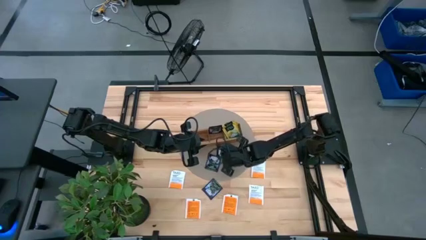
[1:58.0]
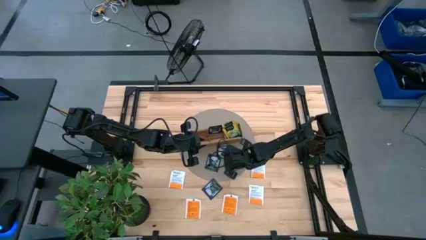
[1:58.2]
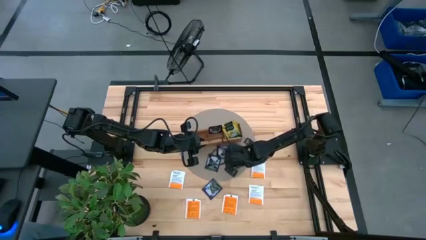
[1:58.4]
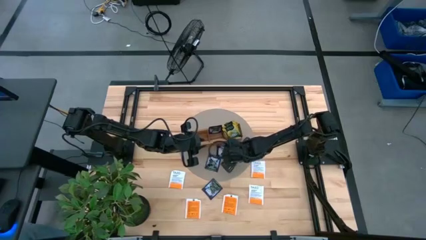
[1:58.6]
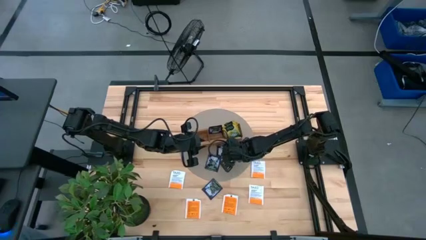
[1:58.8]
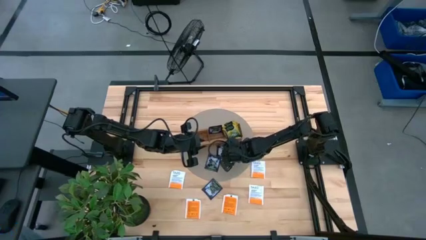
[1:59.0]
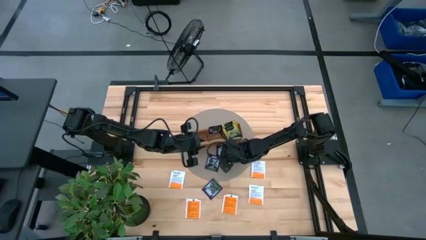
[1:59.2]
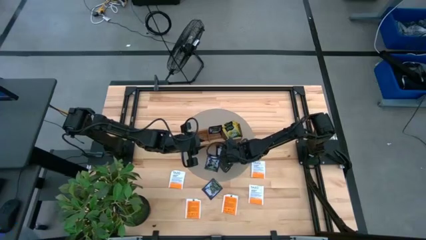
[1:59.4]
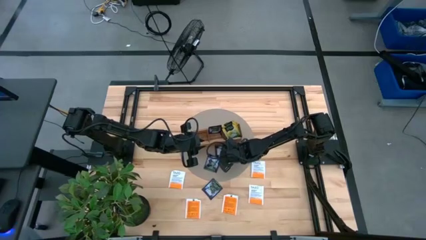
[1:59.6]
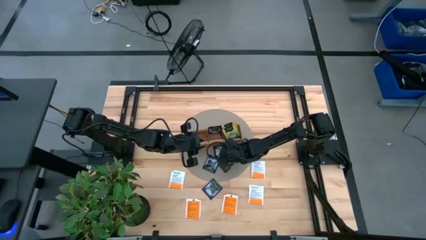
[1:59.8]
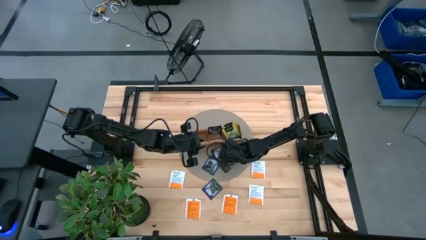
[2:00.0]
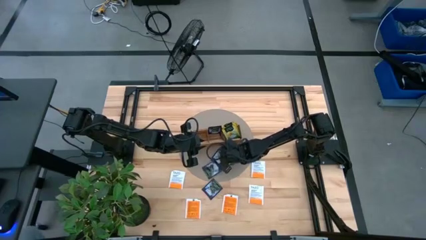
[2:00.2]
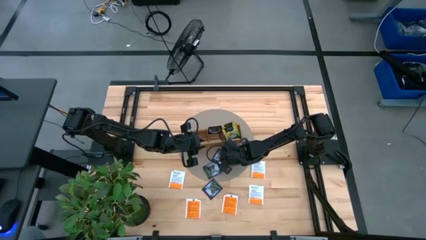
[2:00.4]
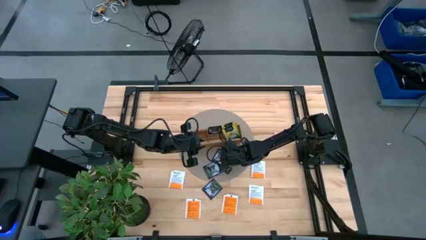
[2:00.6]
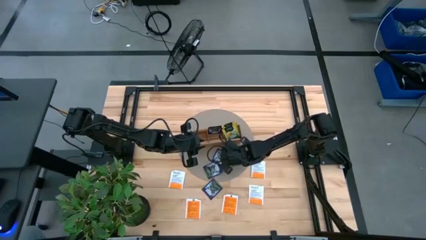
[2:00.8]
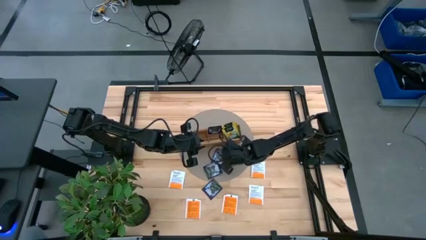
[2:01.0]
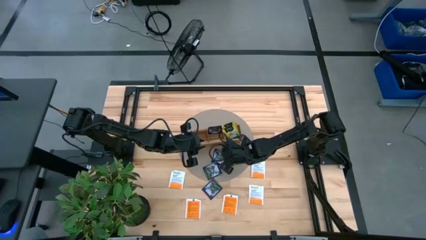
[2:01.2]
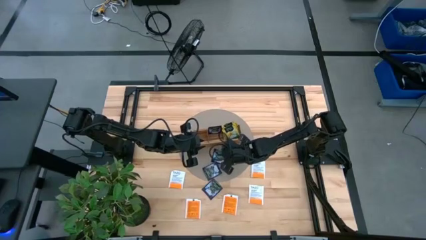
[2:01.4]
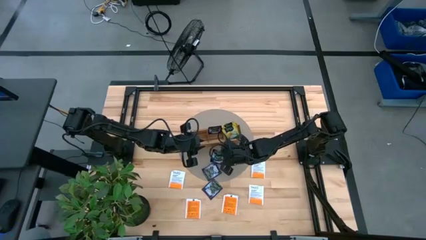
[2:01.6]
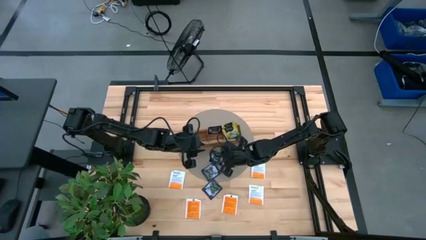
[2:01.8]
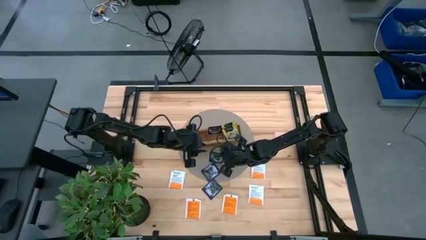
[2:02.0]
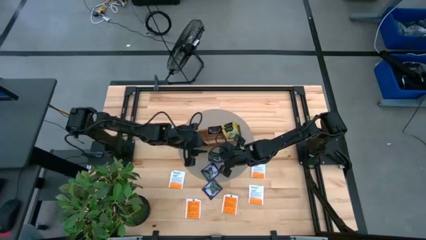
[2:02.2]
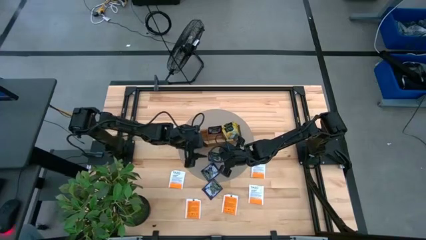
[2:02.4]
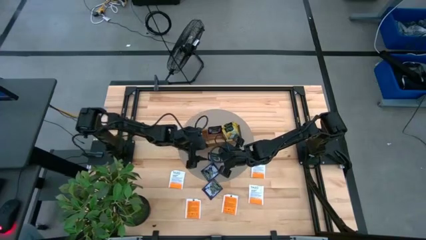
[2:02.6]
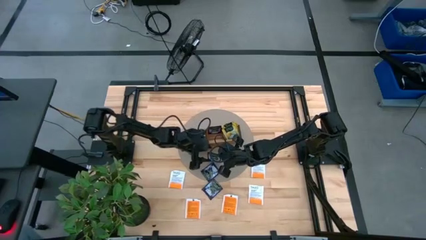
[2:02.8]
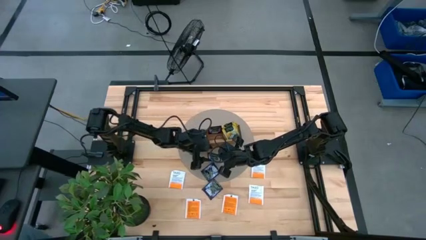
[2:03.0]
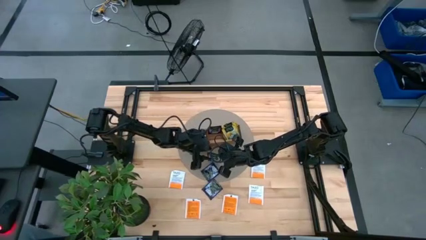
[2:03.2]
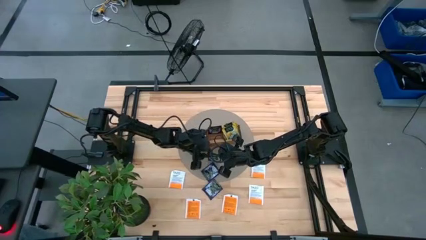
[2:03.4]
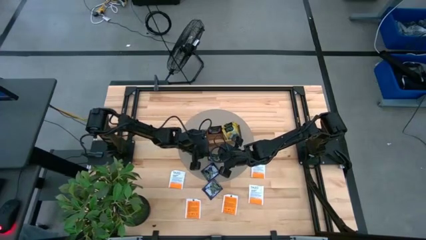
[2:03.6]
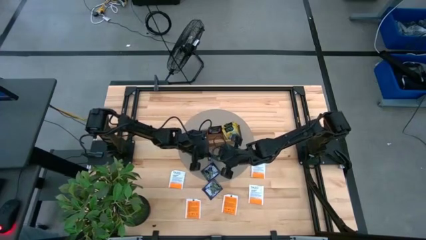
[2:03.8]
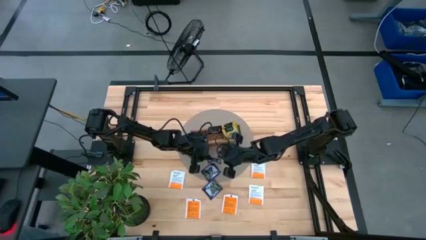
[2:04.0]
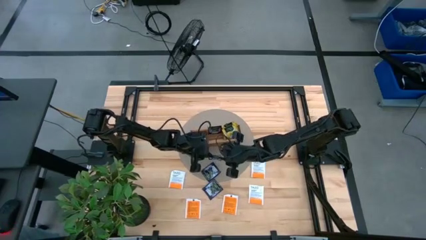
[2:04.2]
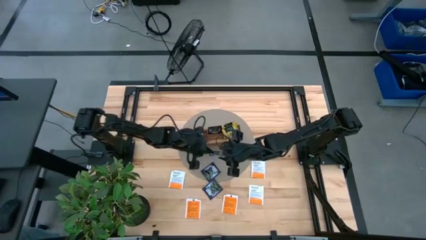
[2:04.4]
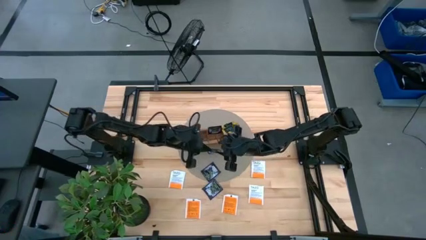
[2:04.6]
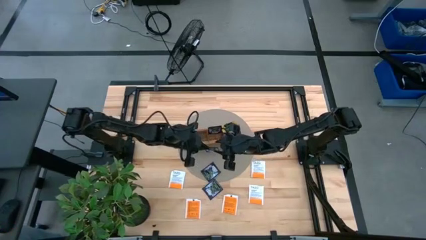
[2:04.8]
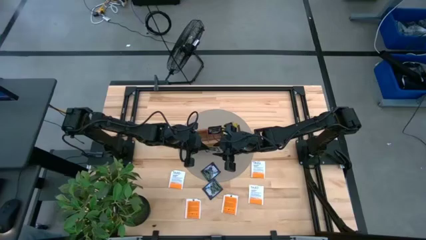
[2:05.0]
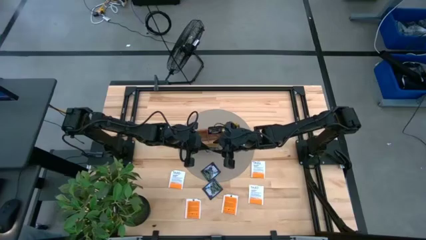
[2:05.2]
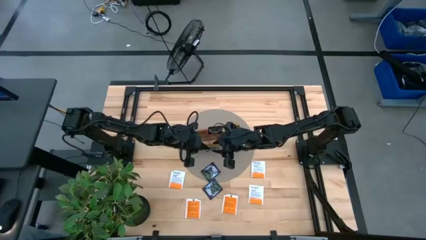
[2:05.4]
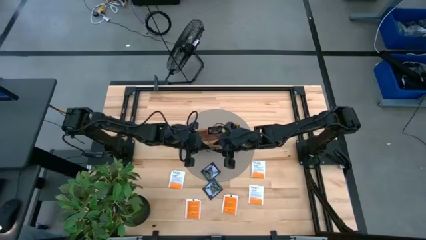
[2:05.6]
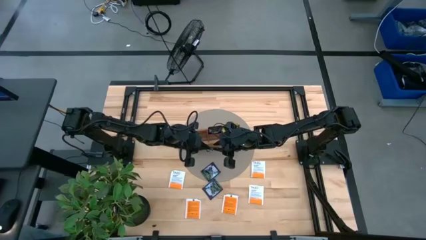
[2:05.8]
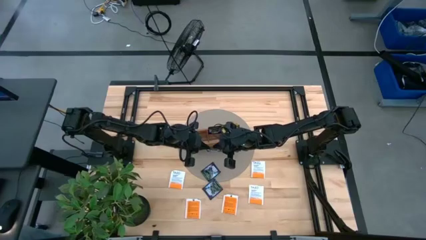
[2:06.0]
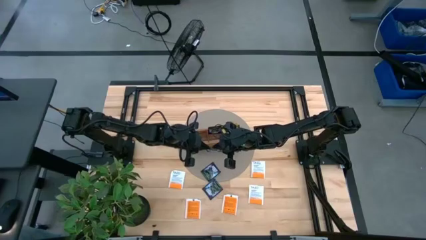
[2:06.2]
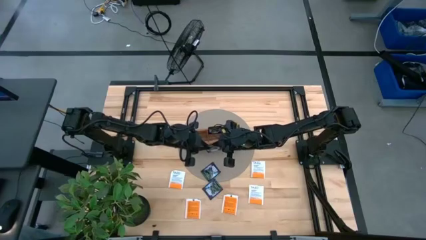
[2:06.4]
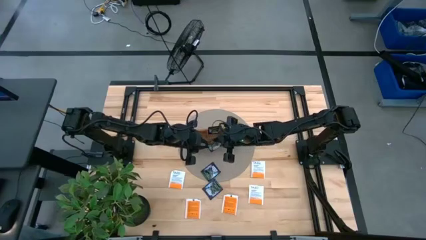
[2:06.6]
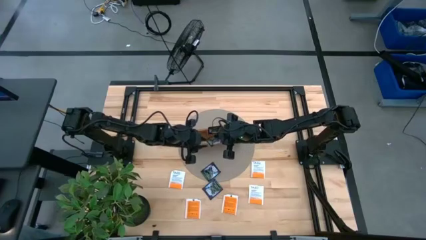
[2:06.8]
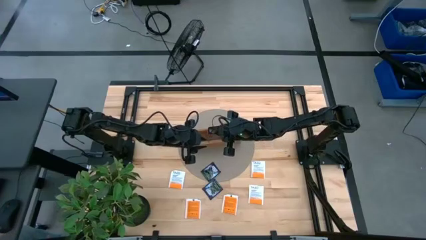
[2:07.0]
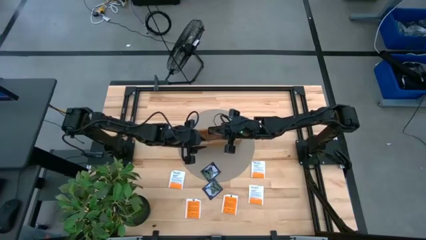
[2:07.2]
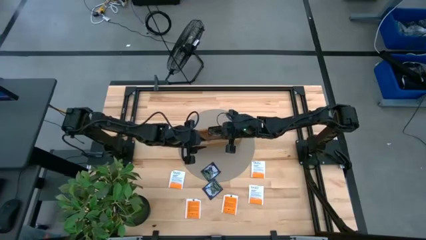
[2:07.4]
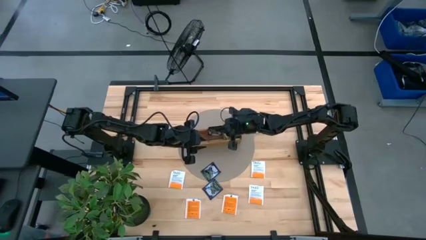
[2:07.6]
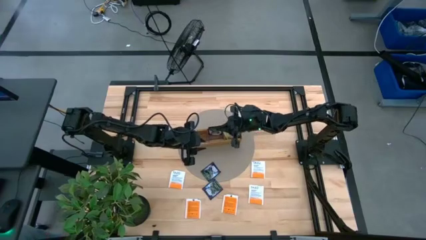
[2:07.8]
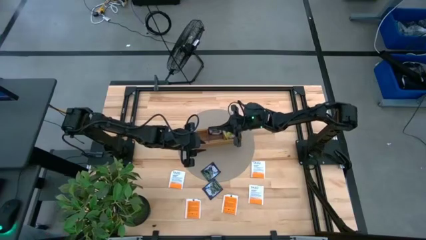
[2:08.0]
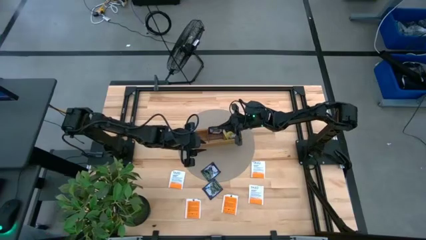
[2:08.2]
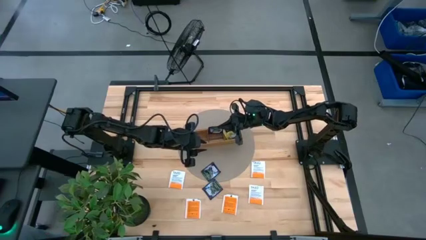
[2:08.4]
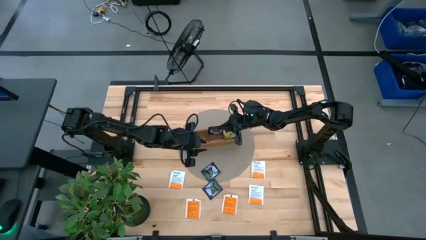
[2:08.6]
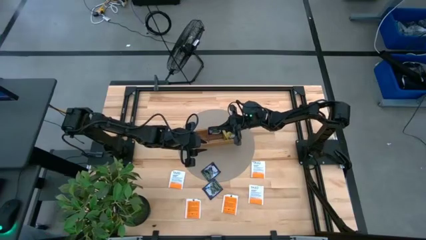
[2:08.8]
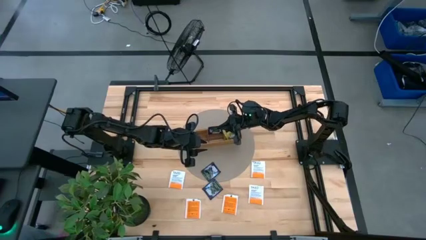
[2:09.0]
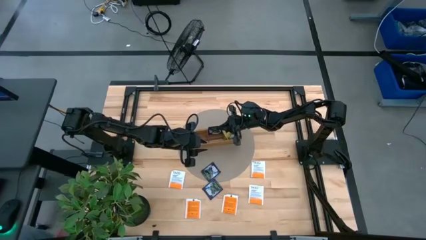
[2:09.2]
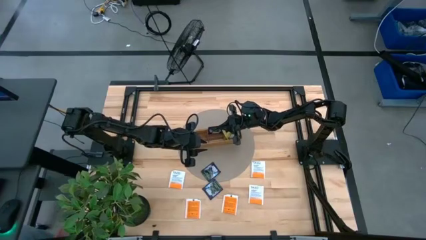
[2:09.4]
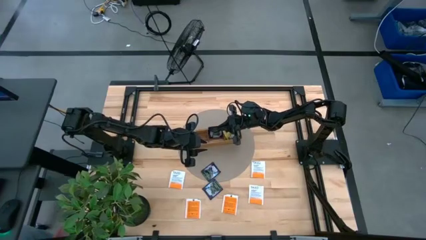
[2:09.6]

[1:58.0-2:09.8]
Task: Pick & Place Tea
Put the violet tea bag into the middle section of the wooden organizer

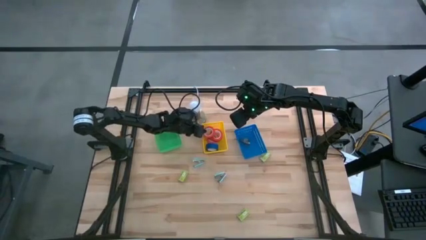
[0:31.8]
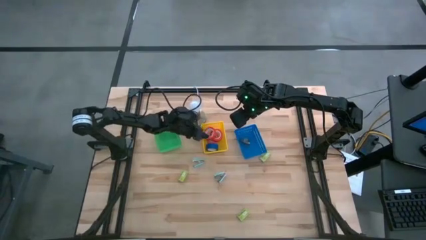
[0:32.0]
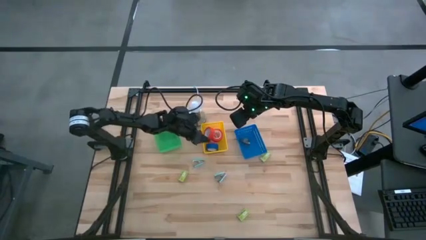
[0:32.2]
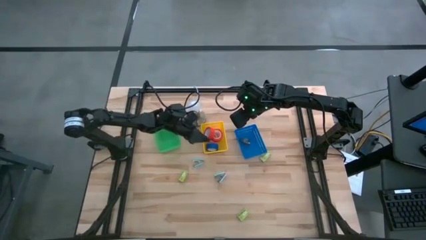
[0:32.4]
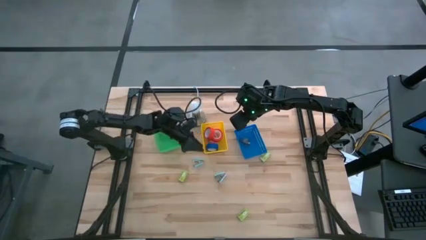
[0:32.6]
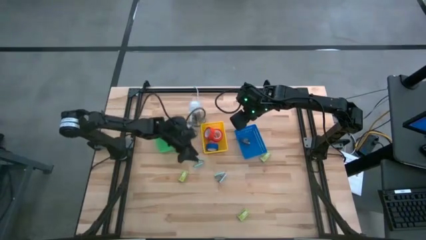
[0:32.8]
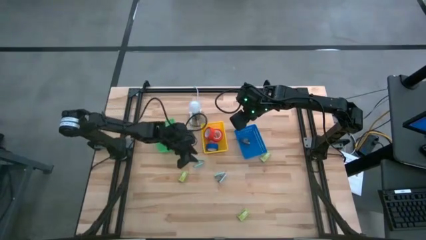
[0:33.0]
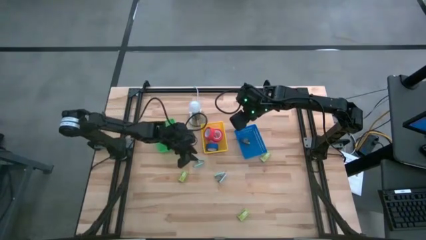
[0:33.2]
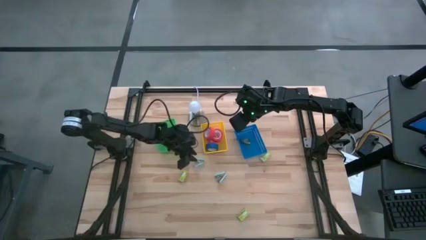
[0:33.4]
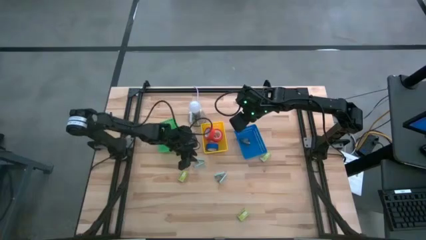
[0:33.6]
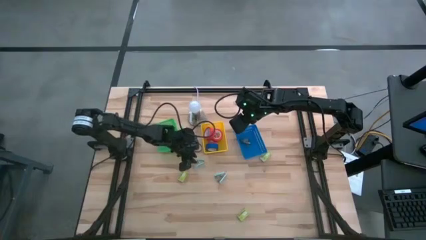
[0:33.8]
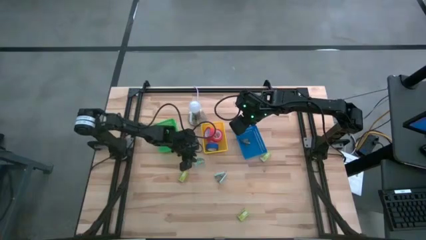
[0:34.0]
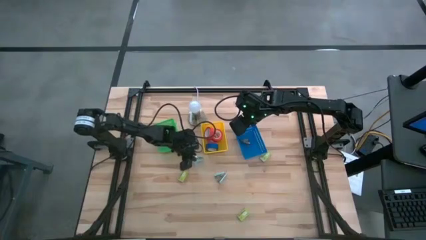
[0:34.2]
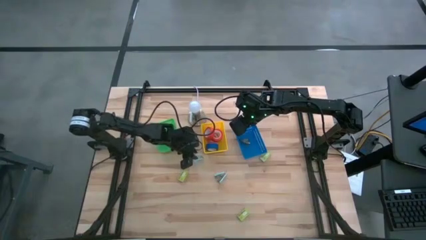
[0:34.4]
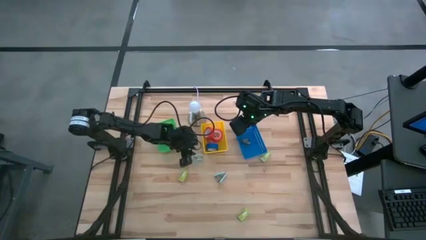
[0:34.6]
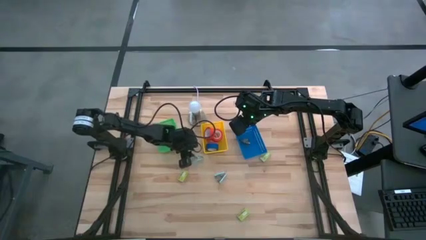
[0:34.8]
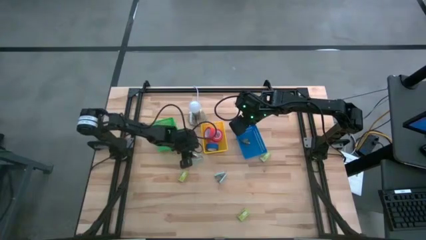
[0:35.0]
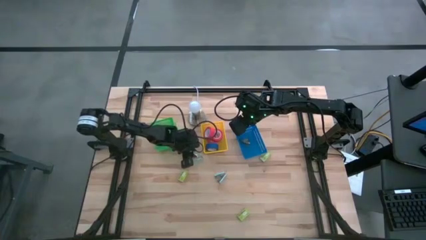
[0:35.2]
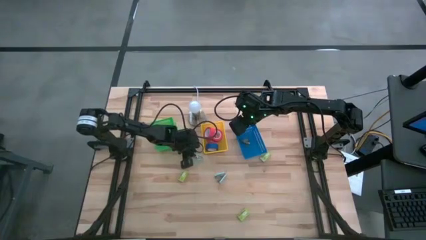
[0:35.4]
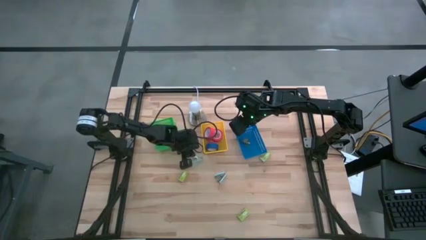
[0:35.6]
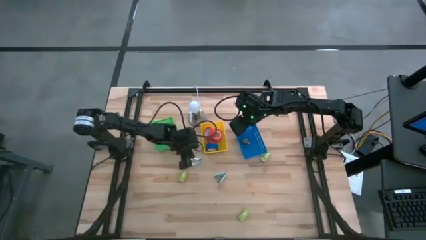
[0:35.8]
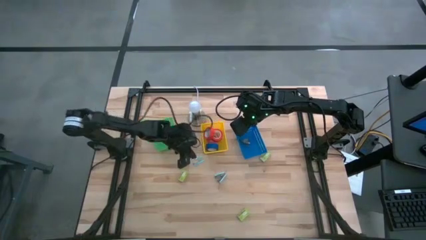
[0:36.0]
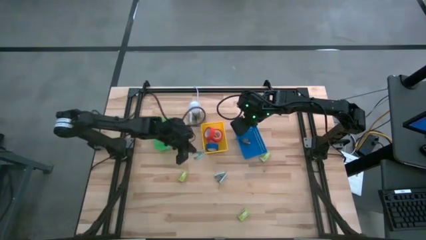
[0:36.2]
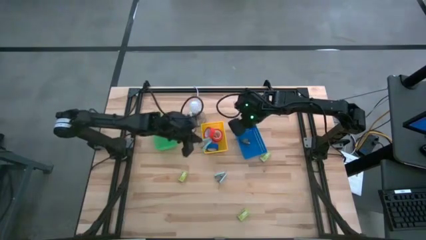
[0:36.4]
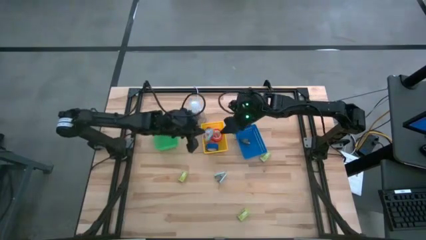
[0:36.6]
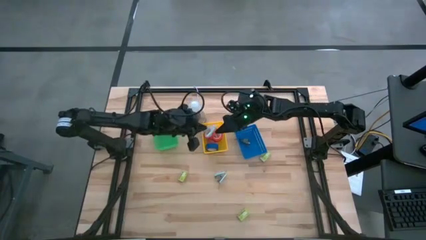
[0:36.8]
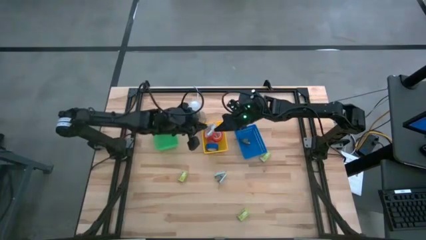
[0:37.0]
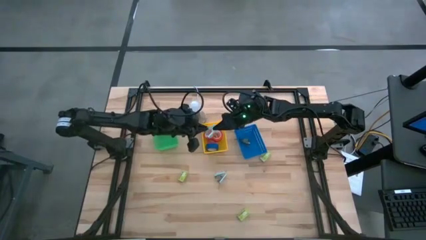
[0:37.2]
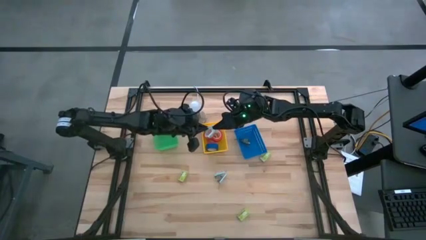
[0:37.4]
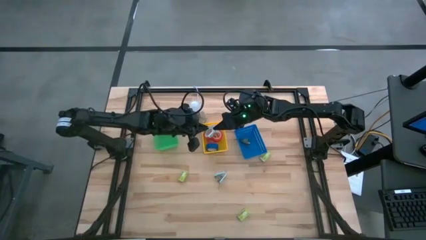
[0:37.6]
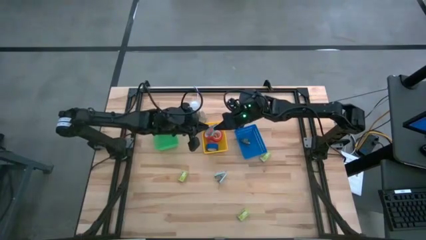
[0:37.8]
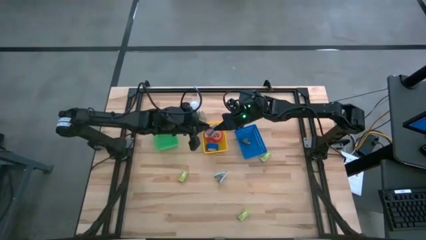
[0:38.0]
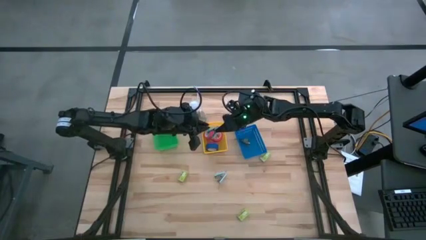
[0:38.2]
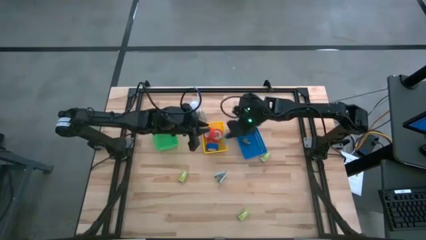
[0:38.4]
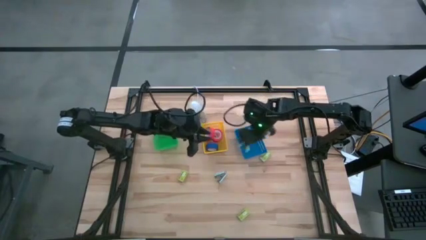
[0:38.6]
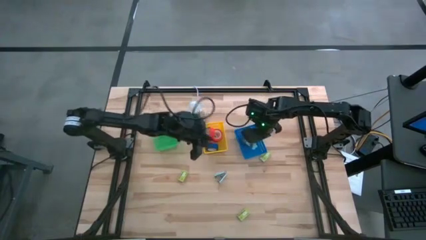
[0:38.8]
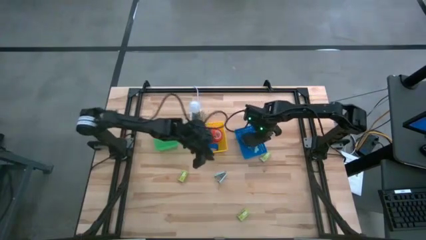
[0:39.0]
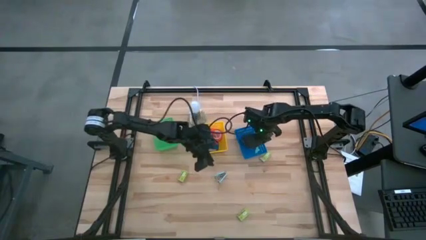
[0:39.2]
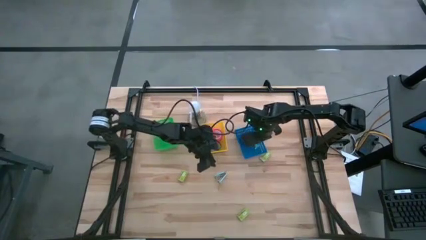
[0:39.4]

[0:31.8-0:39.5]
Task: Pick and place Stapler, Stapler remover, tape
Put the top light blue staple remover into the blue basket
